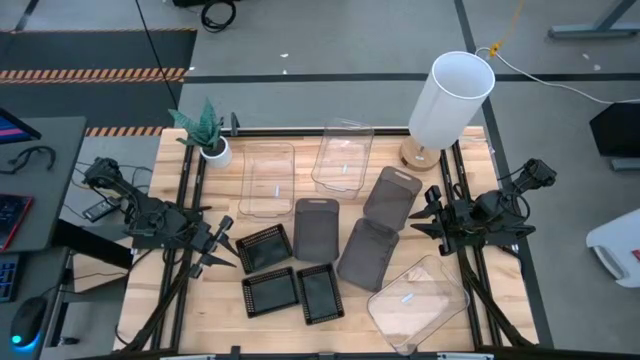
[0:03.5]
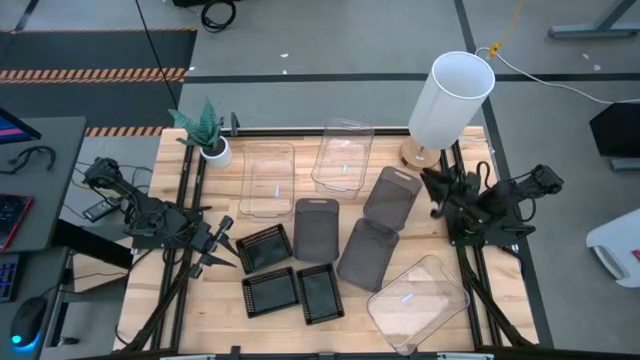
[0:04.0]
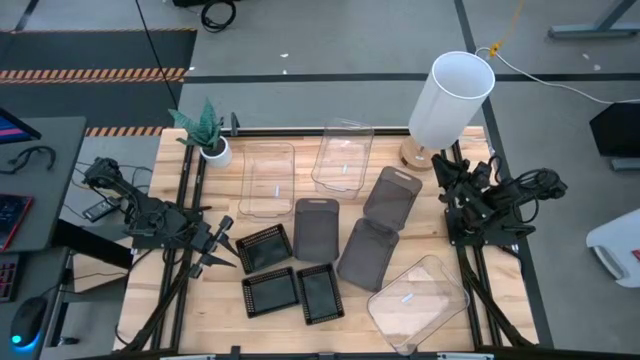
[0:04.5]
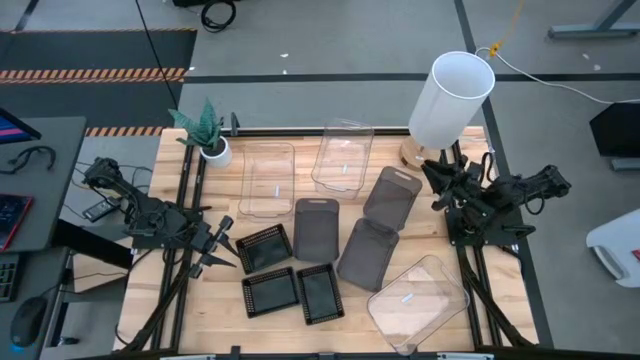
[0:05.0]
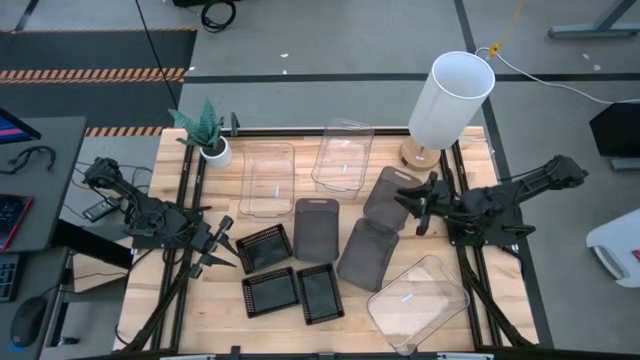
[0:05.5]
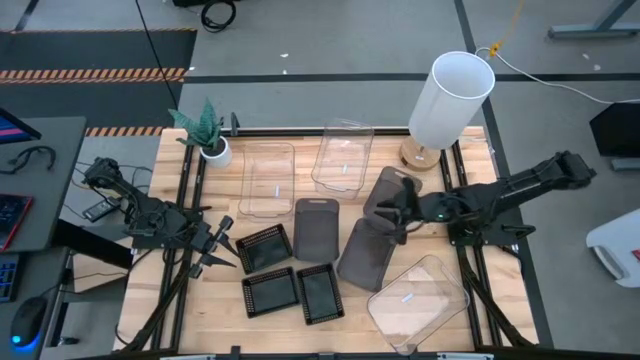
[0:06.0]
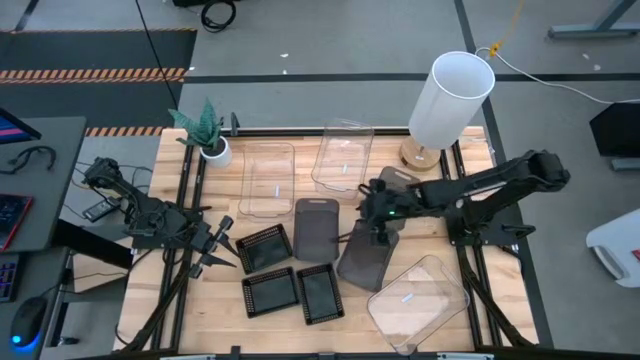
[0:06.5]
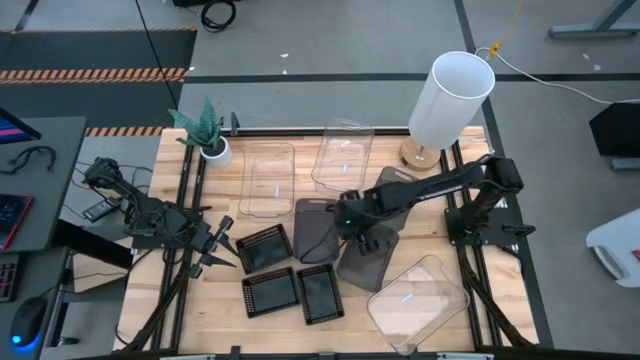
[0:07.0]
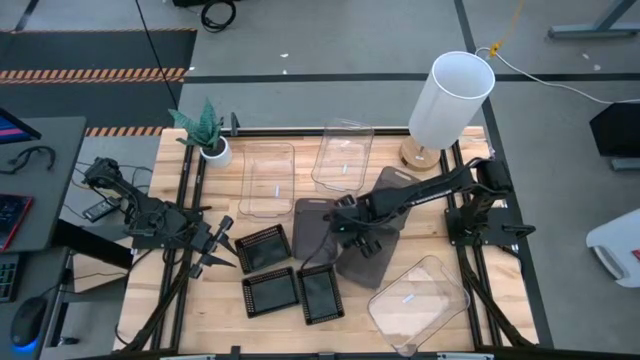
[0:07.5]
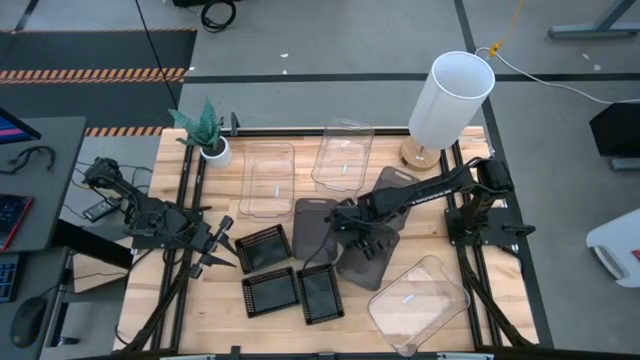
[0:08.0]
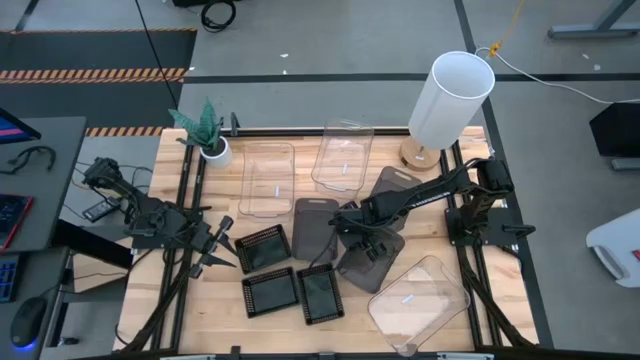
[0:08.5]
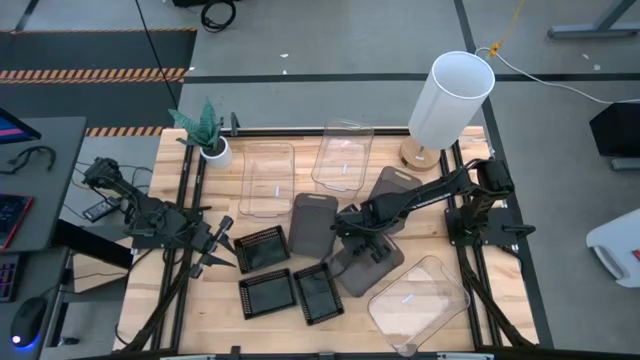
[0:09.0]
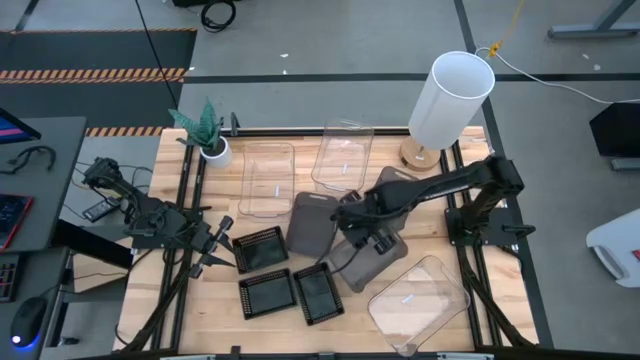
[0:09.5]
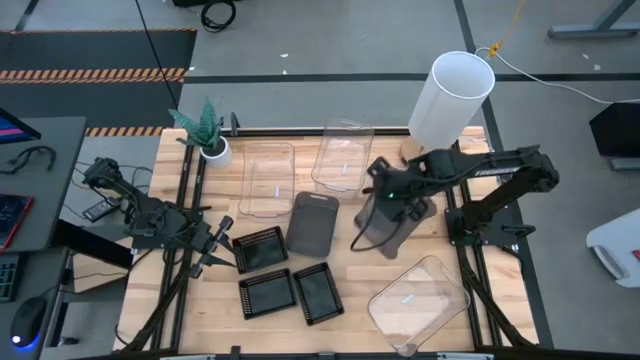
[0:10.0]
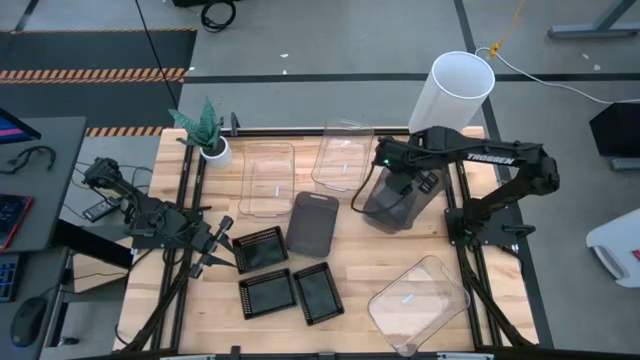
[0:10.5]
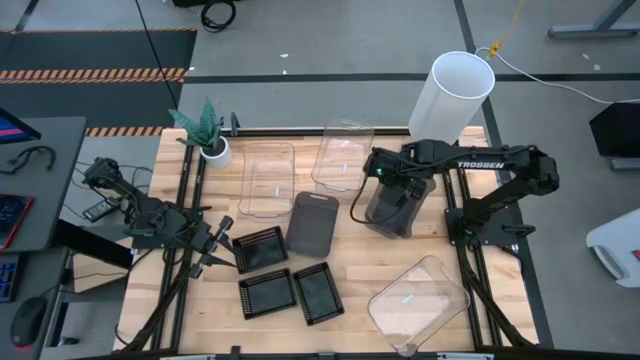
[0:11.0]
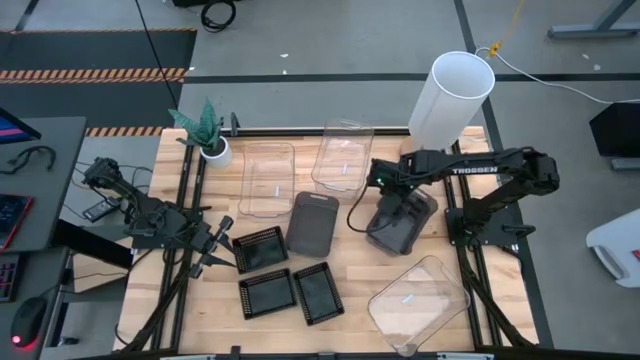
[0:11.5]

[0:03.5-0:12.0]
Stack the bottom right black bin on the top of the top right black bin

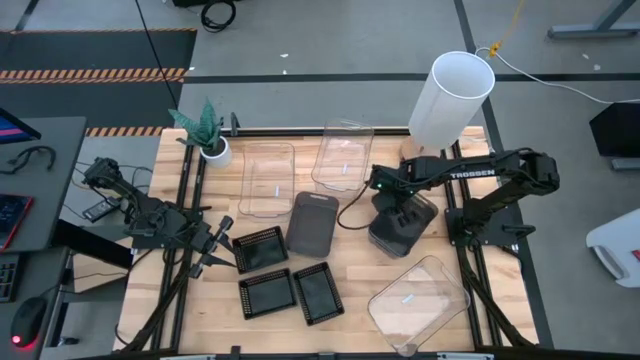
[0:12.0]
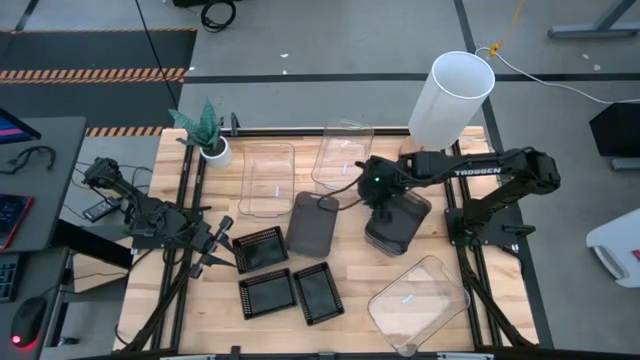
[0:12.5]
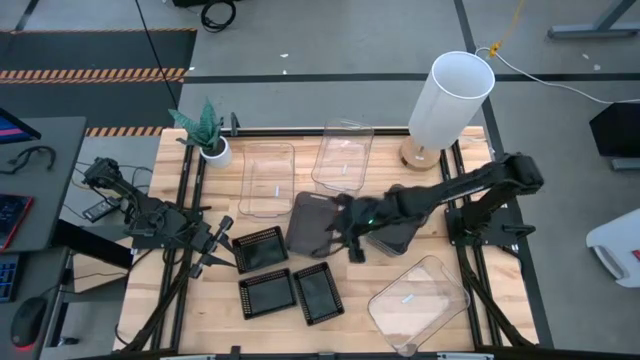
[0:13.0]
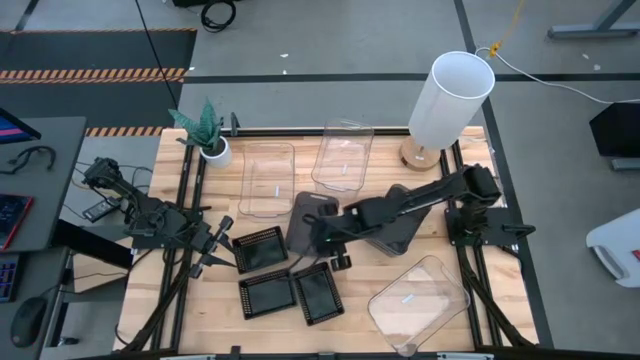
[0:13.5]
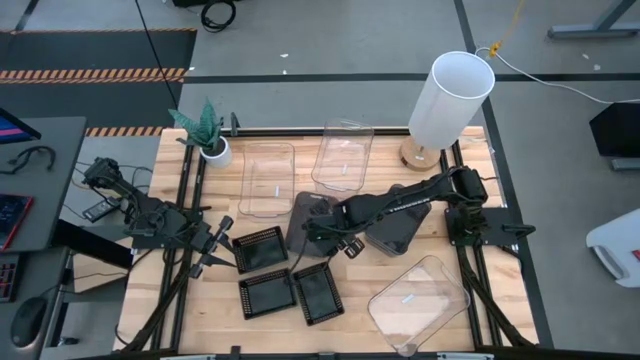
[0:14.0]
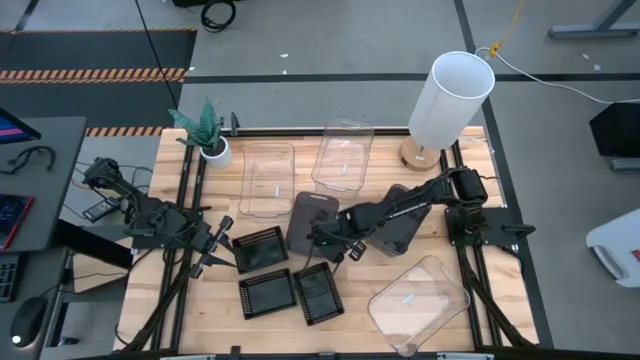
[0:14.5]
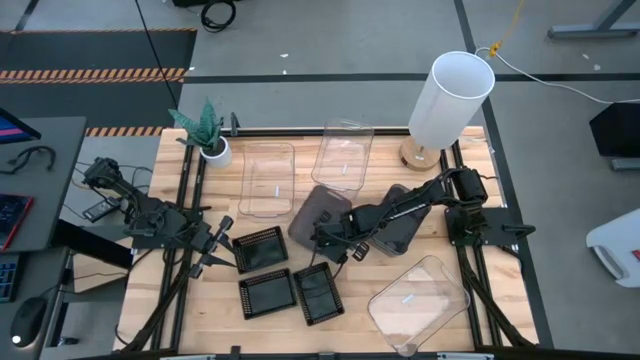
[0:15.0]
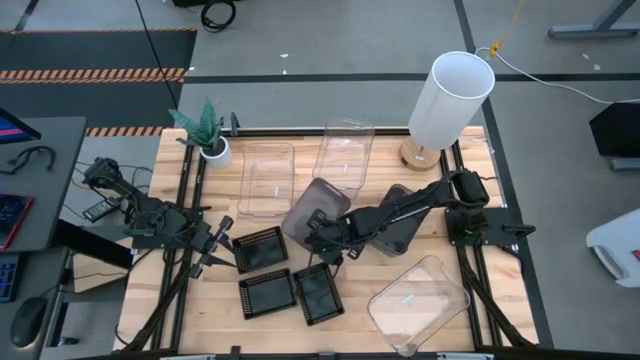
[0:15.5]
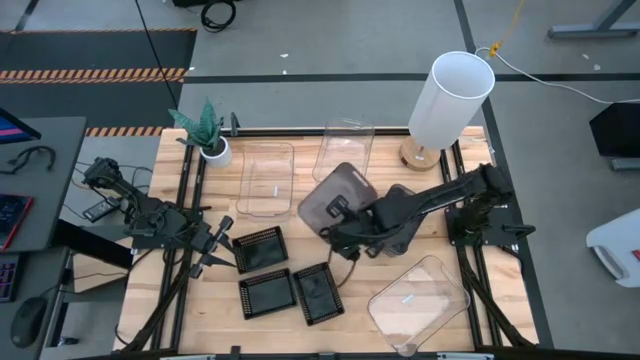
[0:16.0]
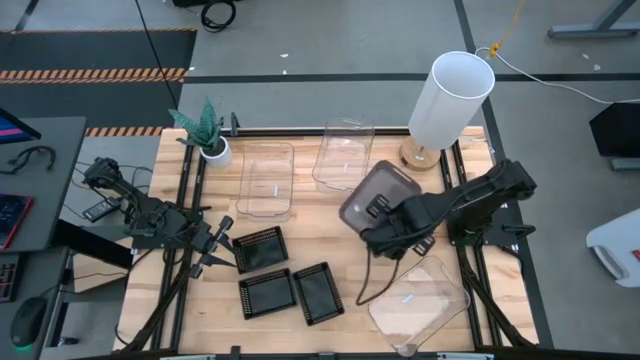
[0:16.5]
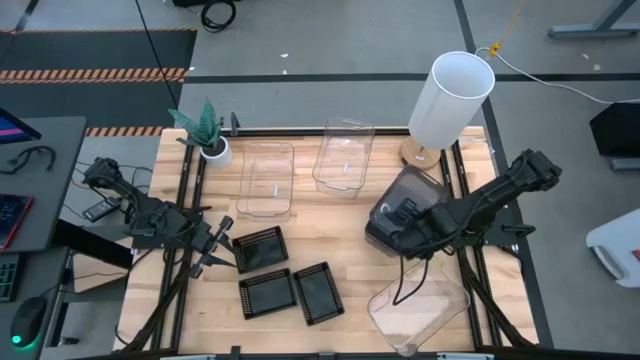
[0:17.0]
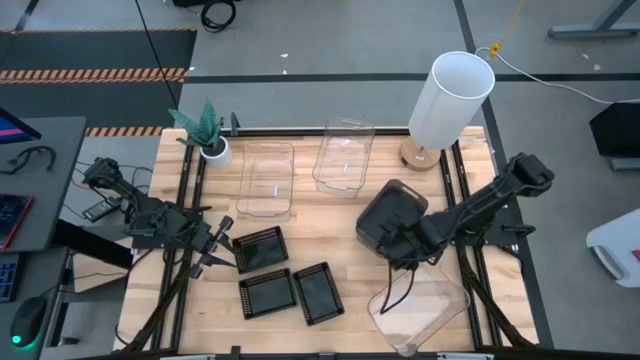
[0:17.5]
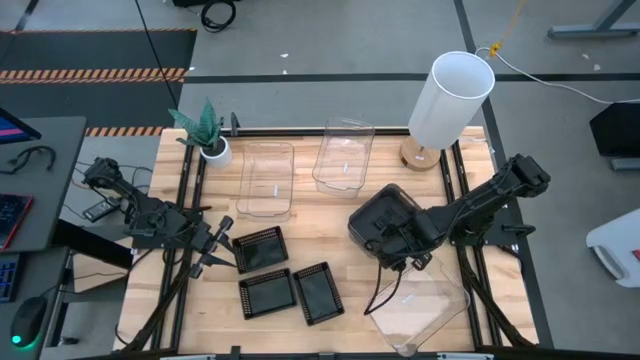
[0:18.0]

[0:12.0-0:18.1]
Stack the left black bin on the top of the right black bin

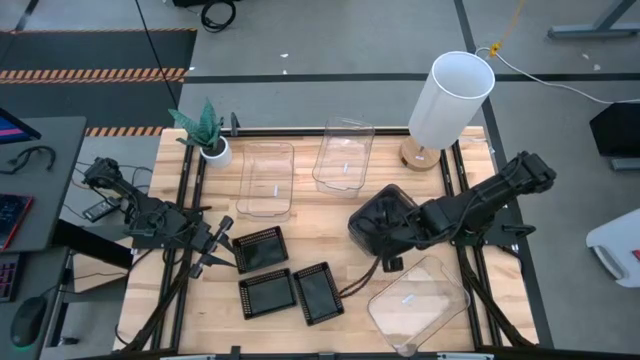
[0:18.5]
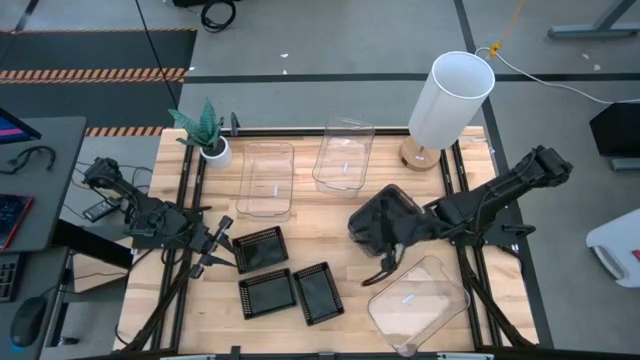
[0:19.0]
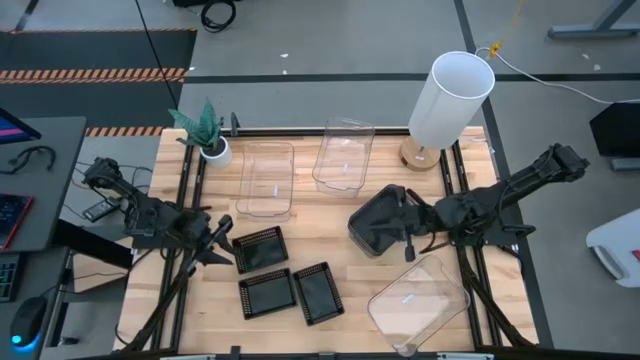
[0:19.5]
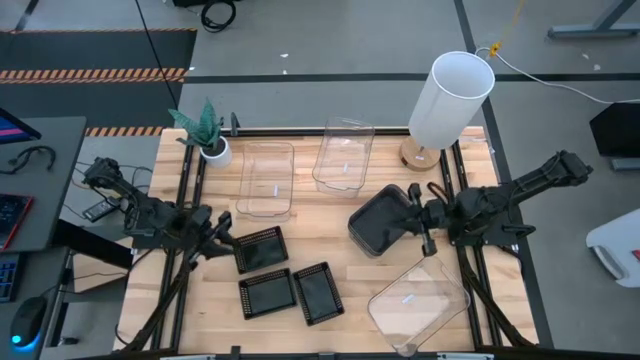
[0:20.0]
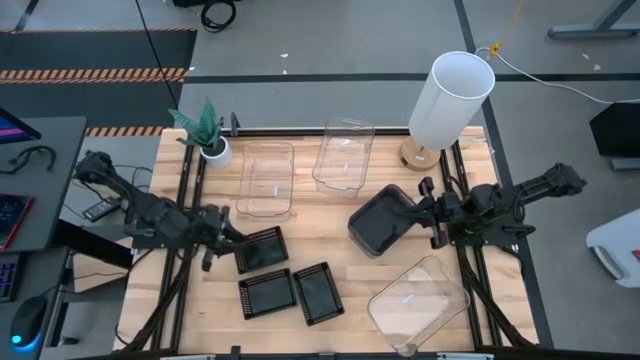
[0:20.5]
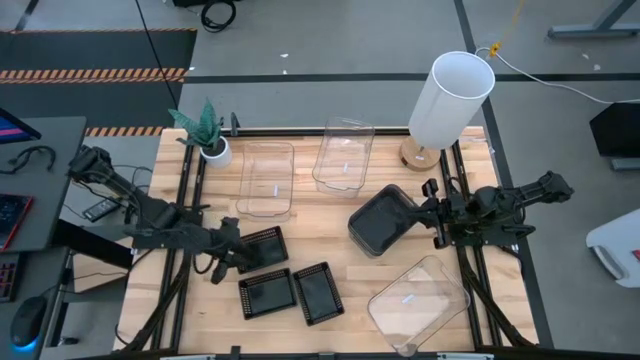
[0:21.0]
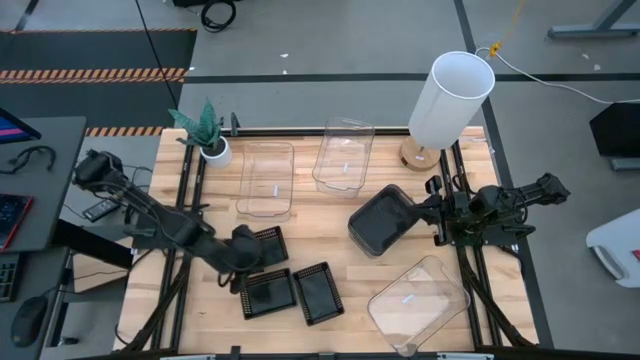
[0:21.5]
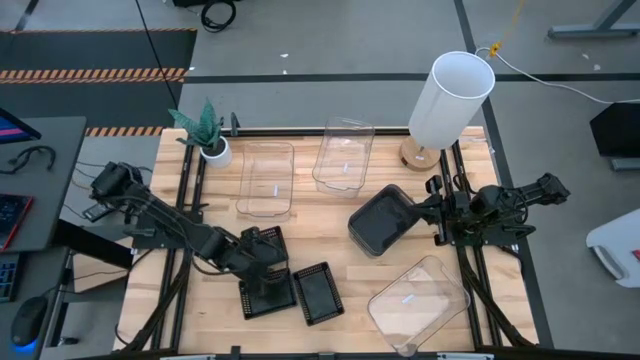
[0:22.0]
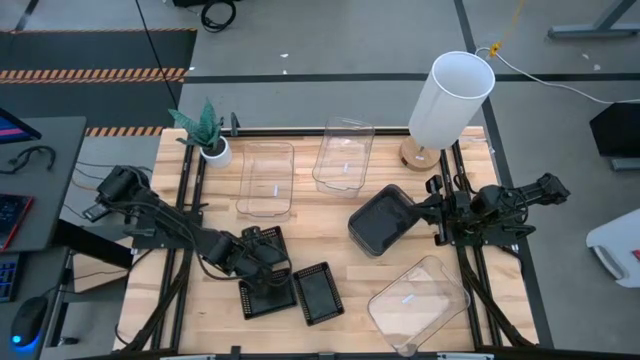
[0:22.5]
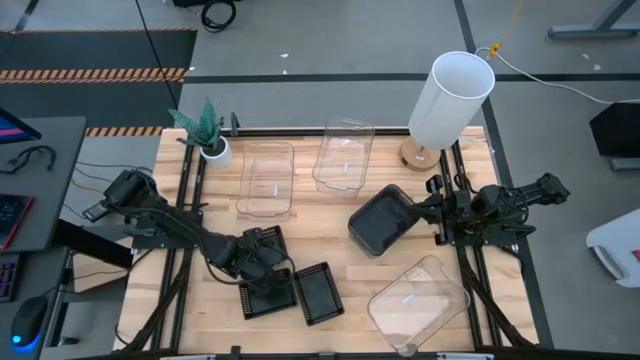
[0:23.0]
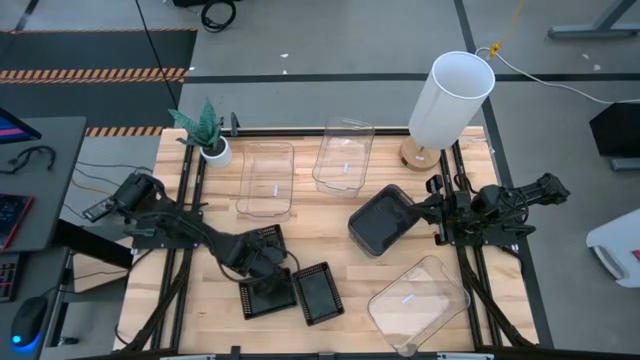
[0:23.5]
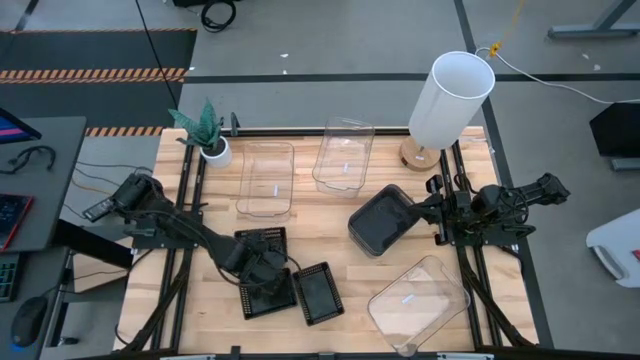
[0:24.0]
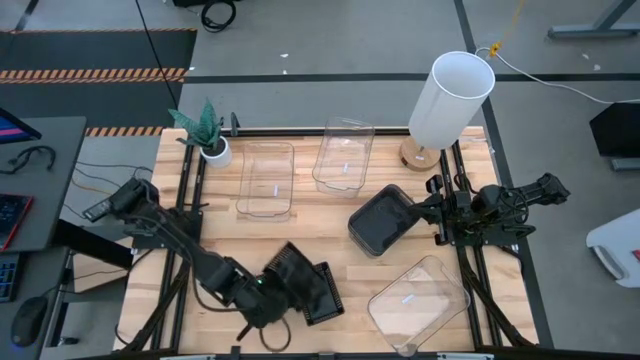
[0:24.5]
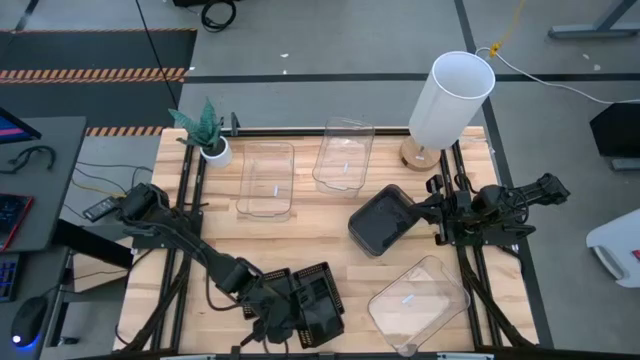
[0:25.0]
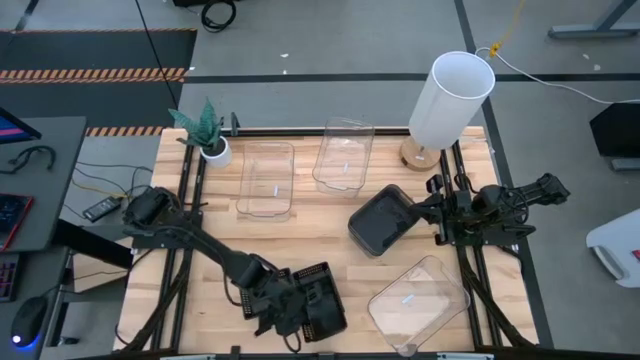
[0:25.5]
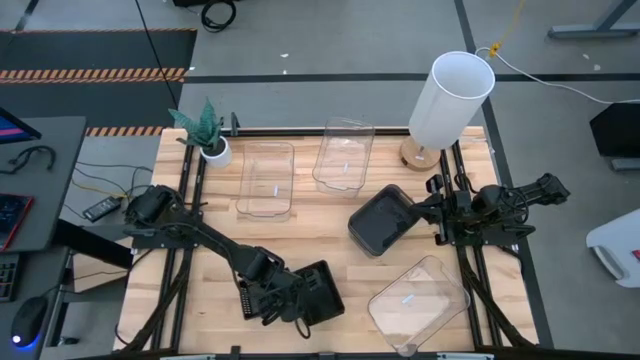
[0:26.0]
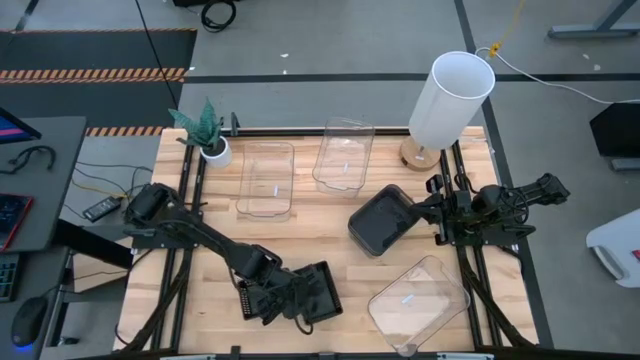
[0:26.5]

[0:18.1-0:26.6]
Stack the top black basket on the top of the bottom right black basket
